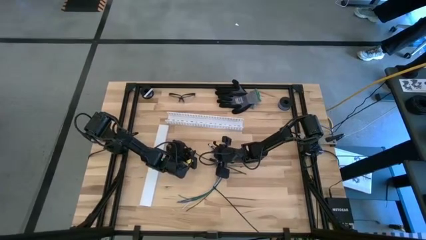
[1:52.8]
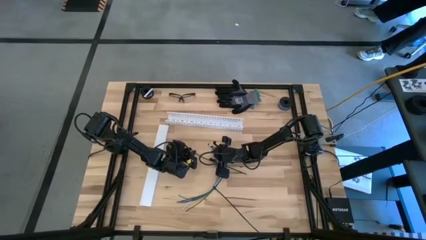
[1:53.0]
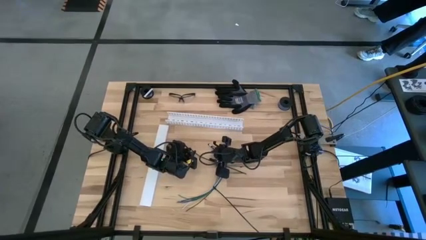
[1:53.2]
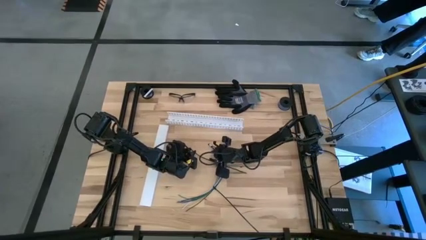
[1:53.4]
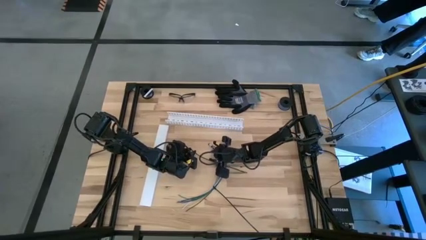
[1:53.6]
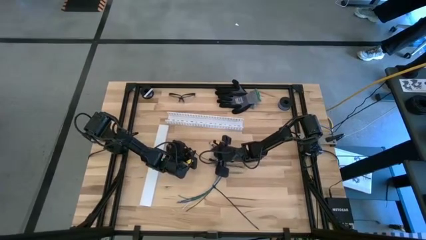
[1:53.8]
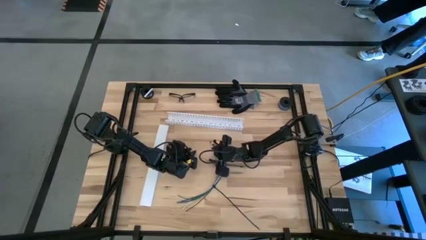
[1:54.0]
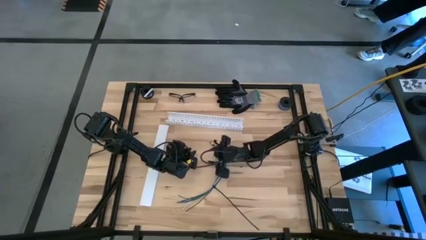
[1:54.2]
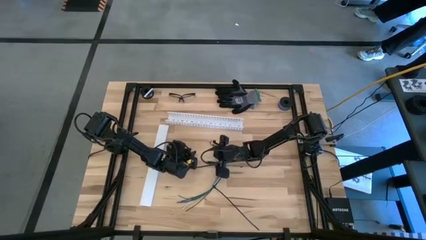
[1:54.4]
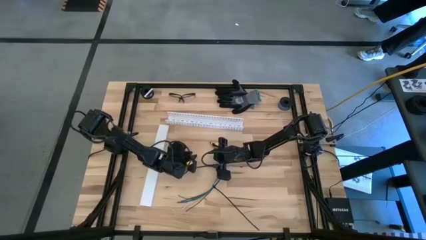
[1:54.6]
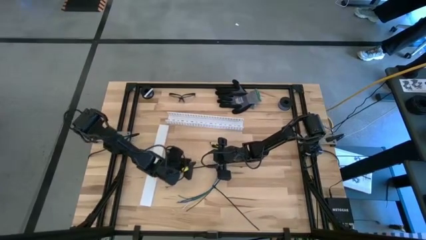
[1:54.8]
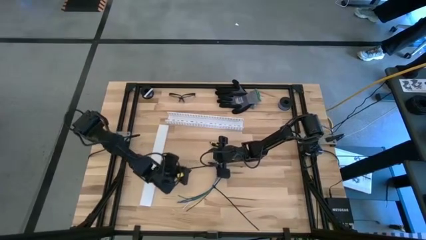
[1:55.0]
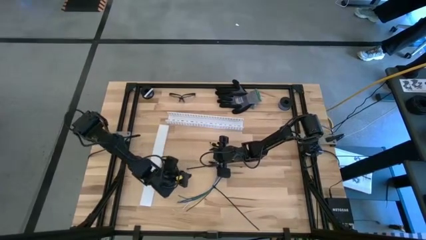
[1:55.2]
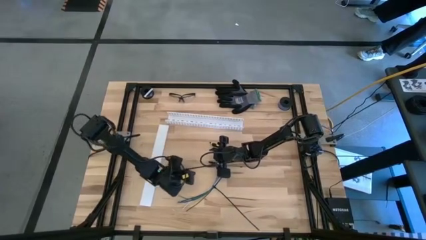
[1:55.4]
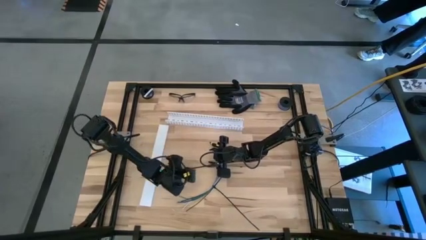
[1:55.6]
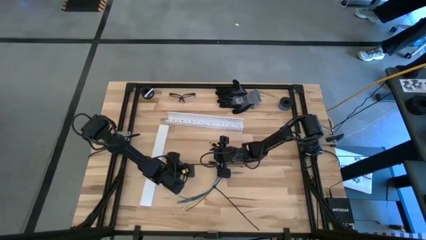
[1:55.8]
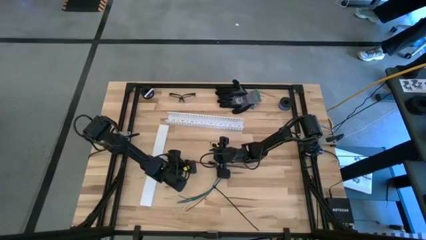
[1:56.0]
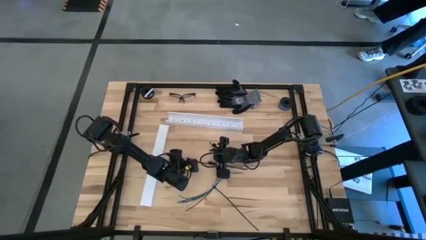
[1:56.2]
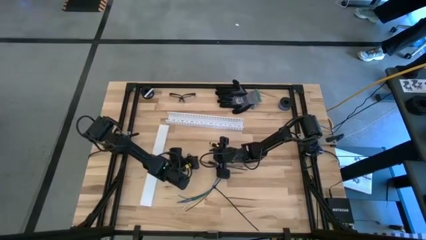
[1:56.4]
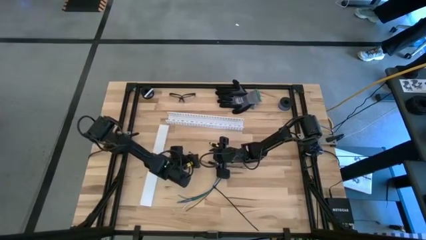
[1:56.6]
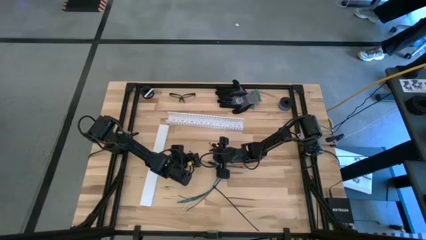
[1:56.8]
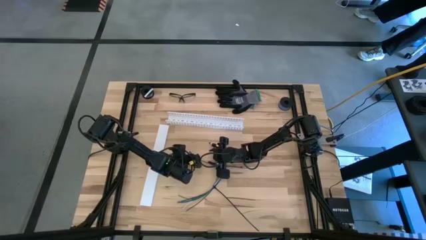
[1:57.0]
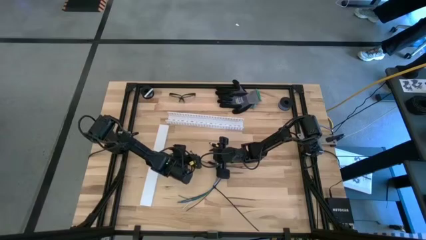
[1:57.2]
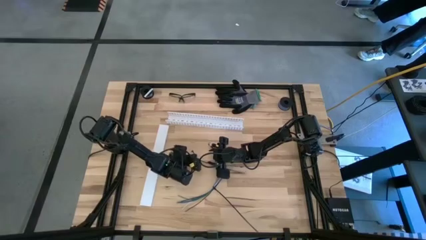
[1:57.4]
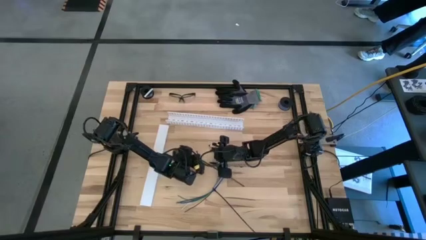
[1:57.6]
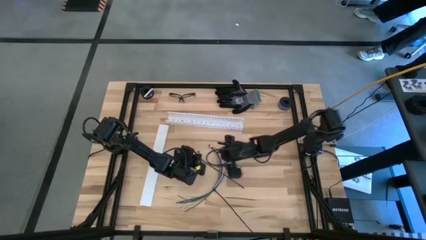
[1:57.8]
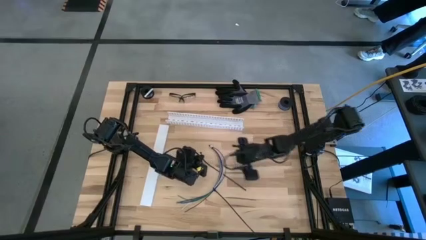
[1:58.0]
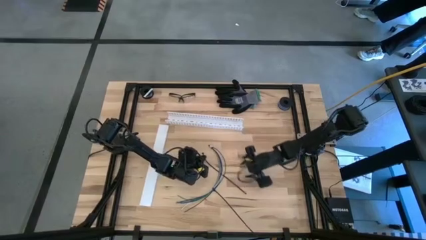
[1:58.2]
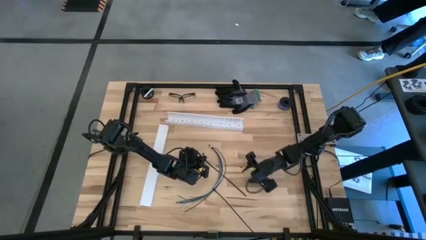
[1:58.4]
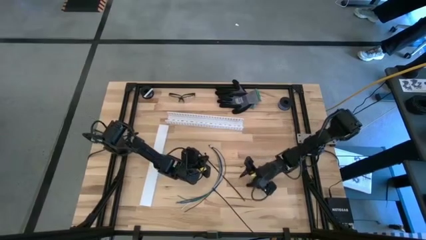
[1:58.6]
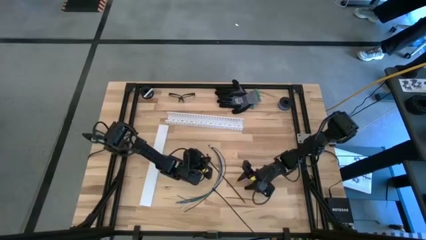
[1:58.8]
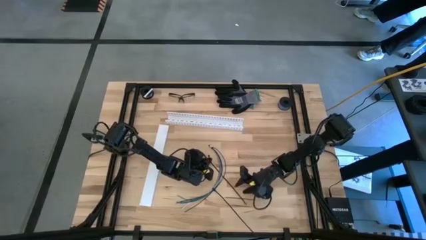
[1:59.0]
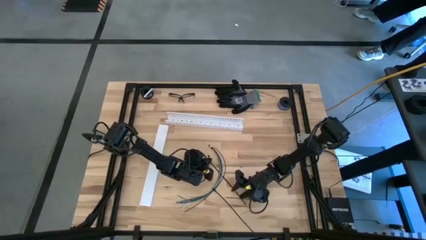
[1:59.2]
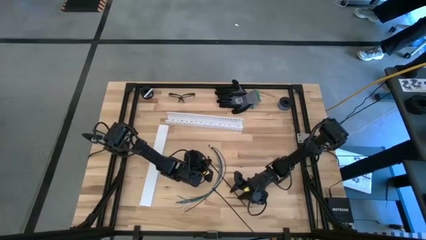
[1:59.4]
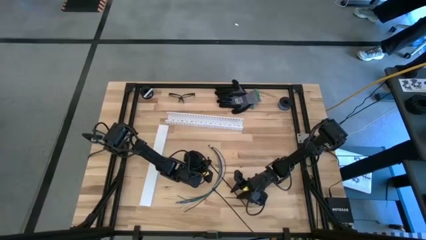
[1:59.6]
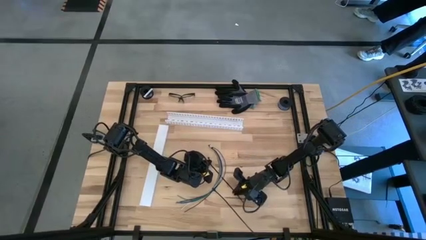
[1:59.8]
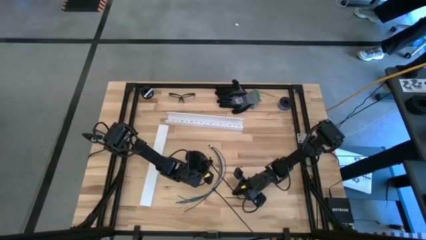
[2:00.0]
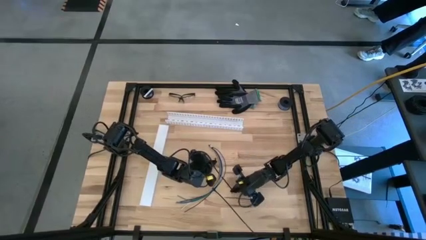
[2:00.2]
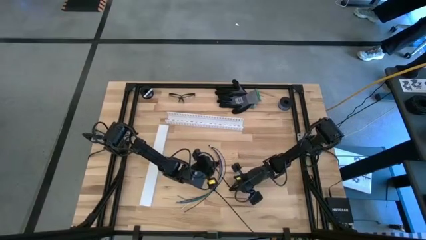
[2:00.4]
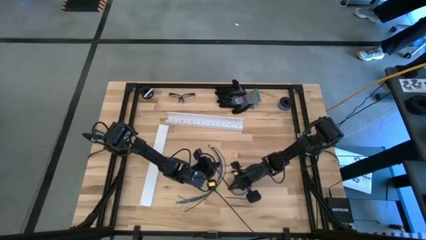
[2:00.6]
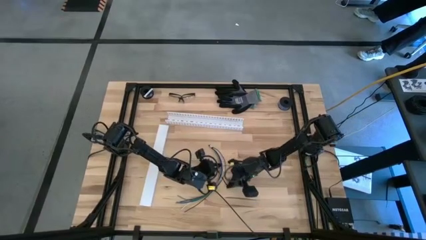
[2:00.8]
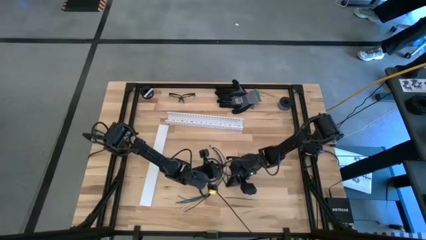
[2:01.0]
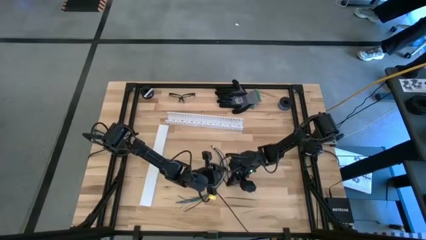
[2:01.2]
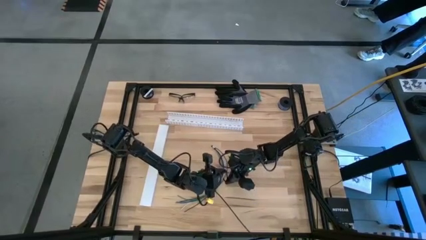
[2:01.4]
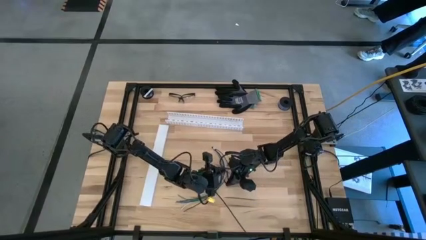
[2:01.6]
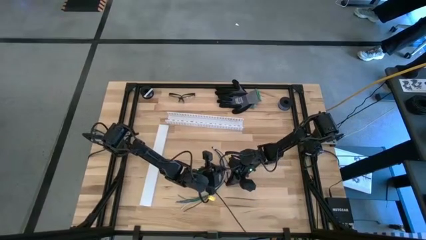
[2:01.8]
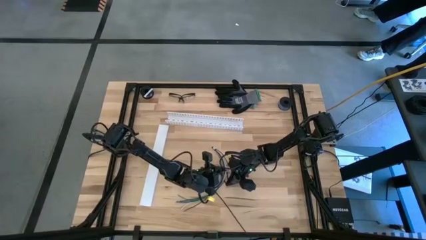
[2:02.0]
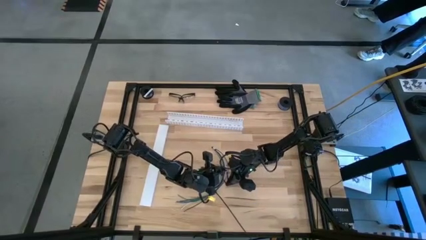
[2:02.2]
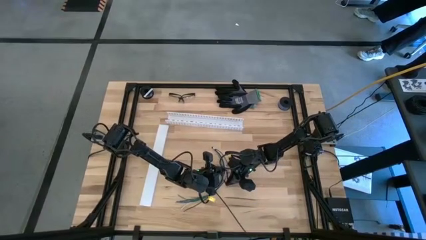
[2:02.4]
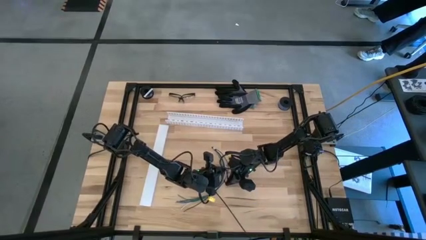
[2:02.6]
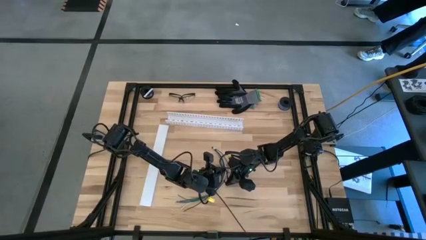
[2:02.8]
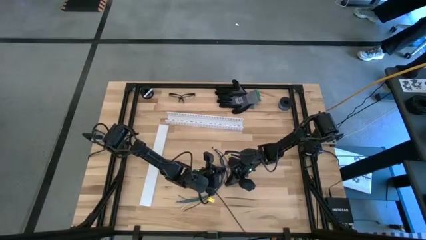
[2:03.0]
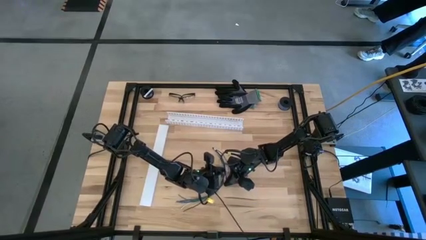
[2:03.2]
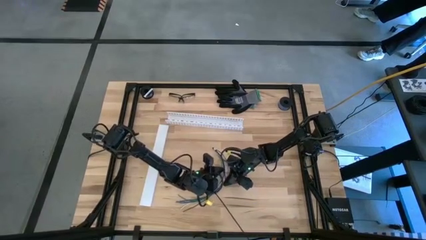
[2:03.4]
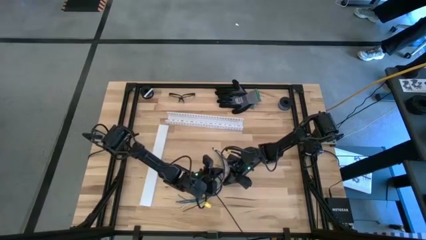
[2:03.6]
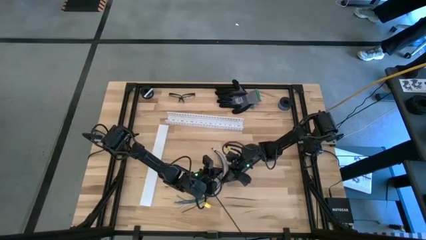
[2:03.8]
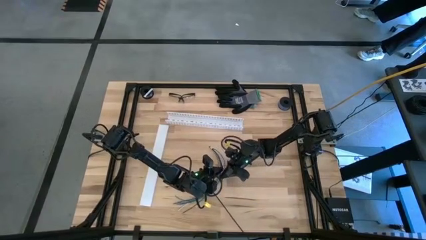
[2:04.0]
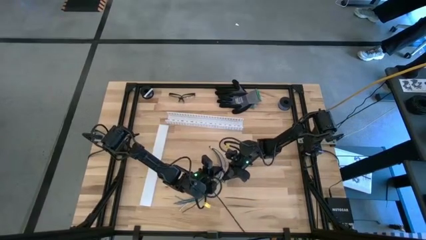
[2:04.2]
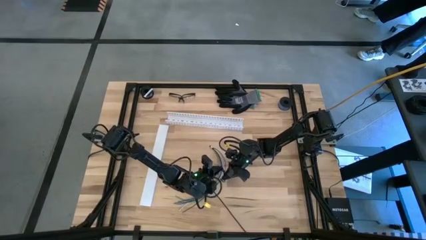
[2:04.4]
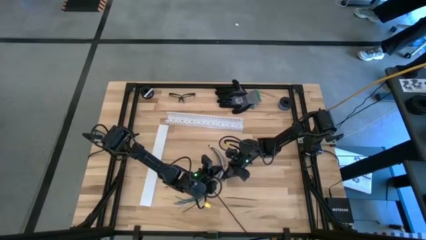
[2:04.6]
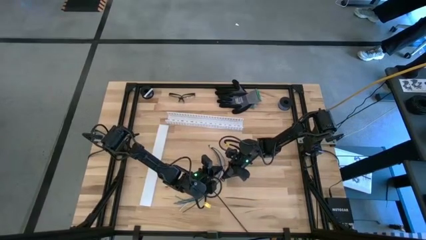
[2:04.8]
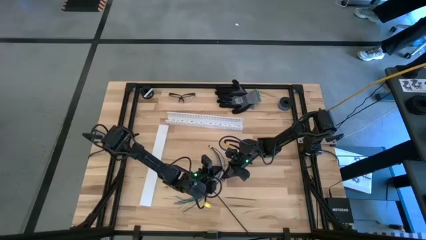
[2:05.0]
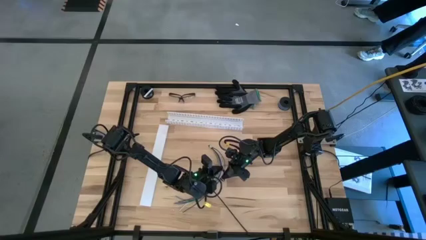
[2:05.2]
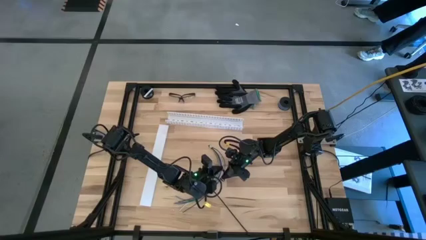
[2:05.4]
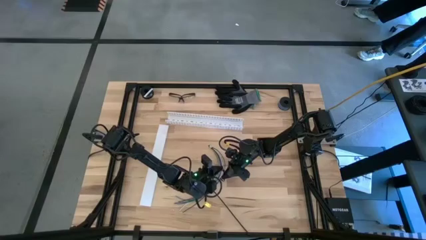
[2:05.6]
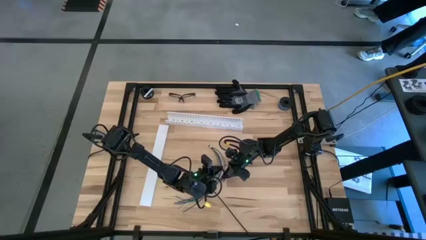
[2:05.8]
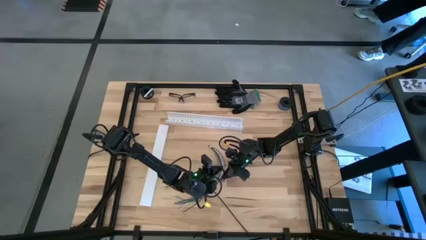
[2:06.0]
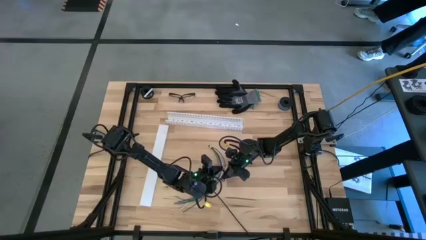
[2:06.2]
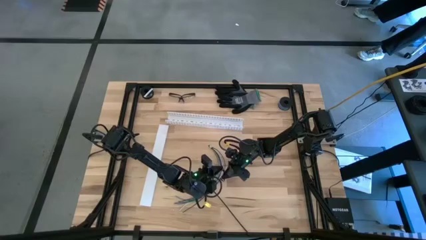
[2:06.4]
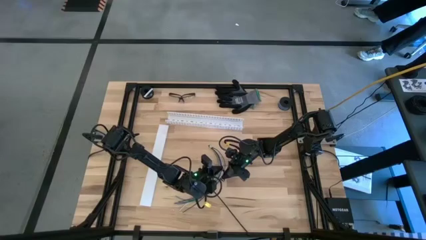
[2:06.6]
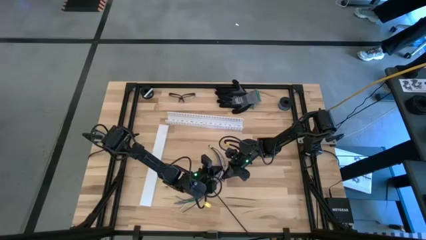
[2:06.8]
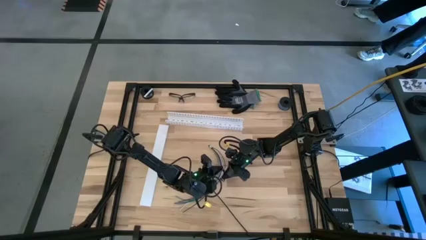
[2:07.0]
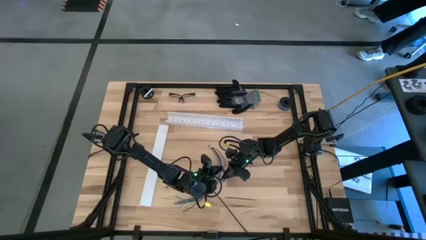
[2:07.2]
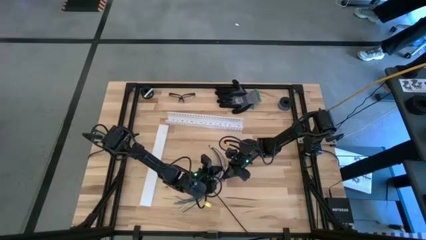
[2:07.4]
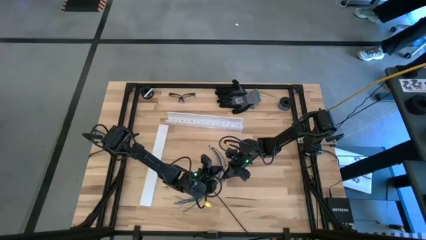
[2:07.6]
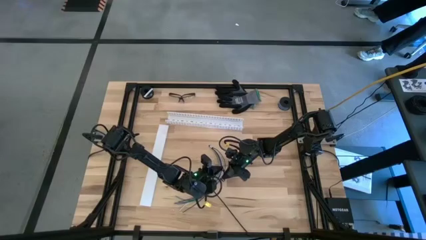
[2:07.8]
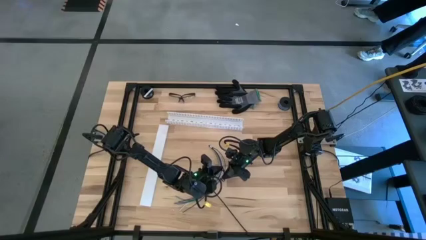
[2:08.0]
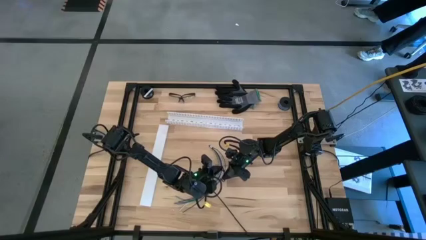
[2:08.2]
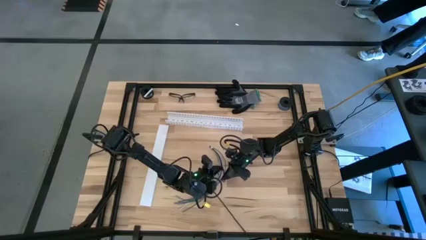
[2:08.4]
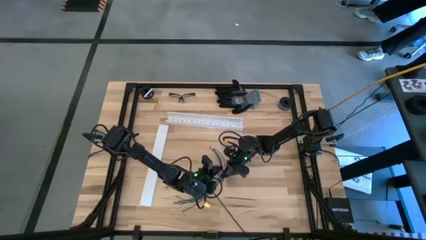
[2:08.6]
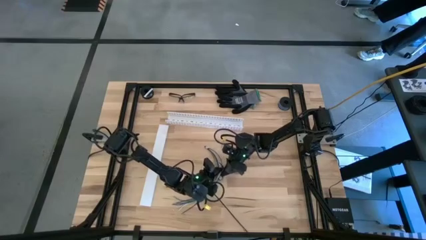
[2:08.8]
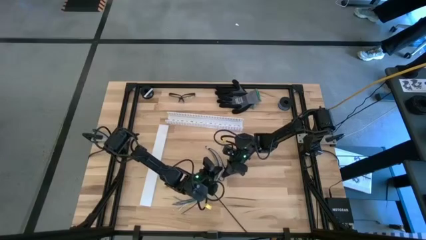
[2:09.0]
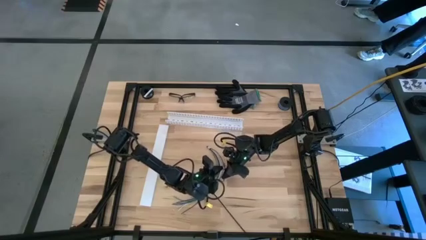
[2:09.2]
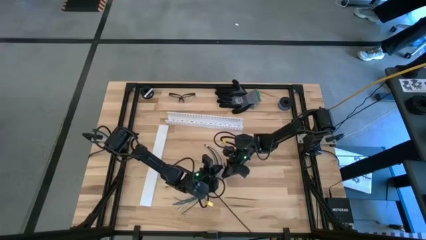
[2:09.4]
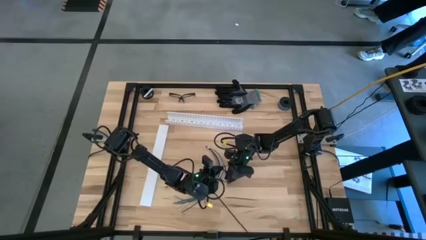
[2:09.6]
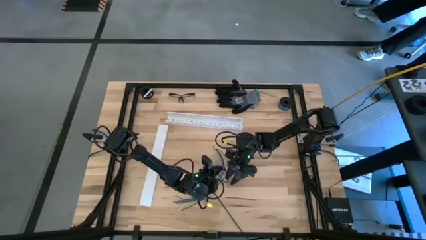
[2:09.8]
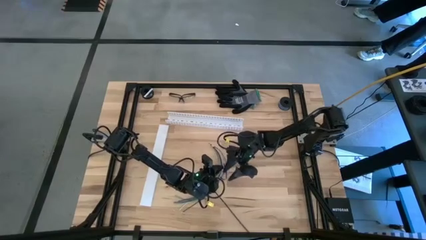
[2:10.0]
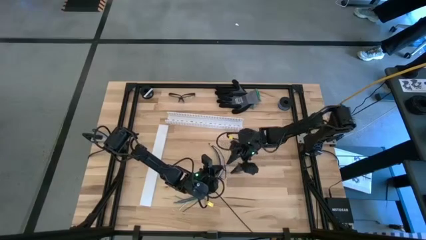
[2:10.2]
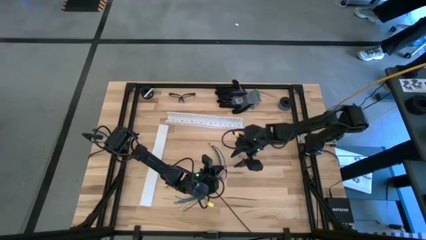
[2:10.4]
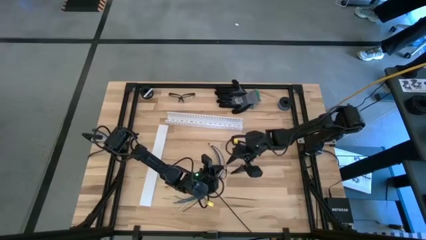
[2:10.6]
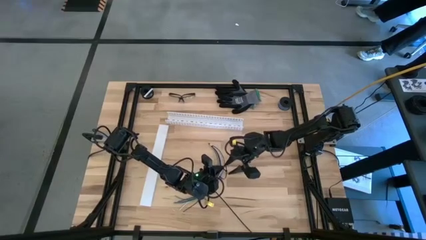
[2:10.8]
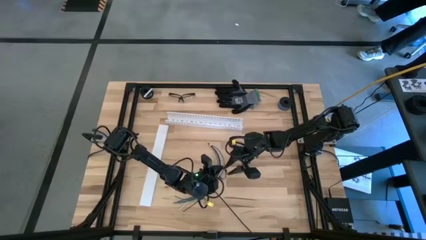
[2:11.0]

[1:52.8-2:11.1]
Task: Ziptie cables
Wrap the black zip tie on the cable
